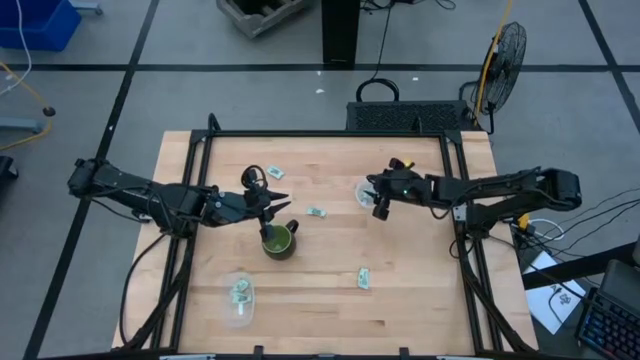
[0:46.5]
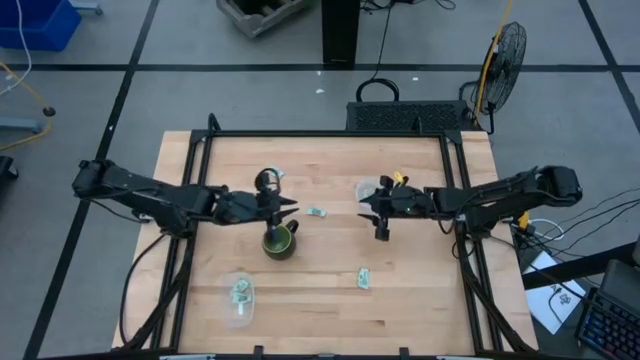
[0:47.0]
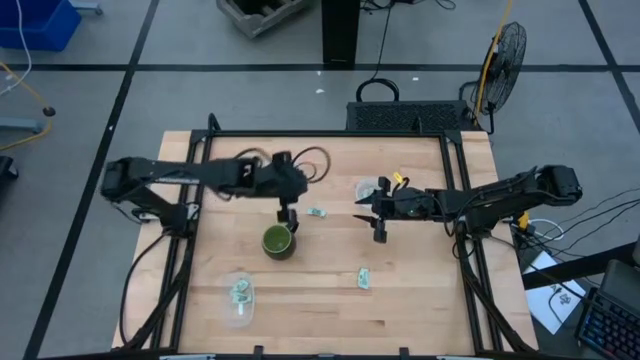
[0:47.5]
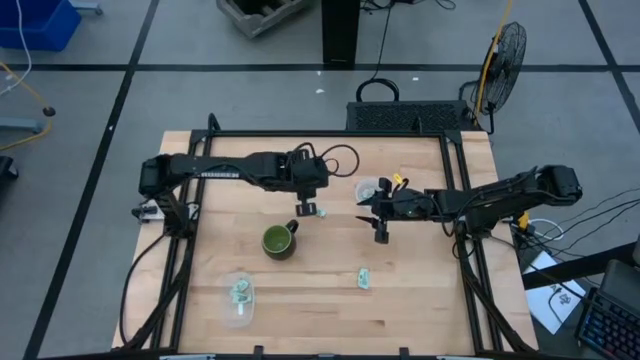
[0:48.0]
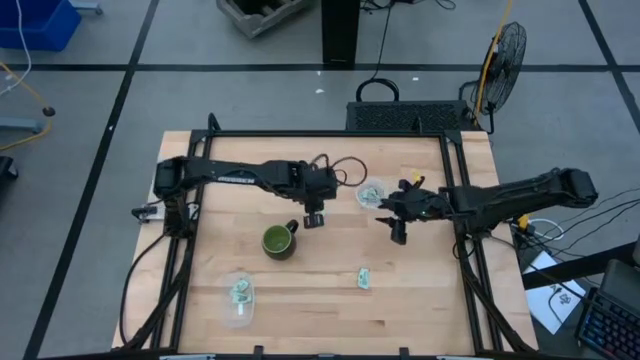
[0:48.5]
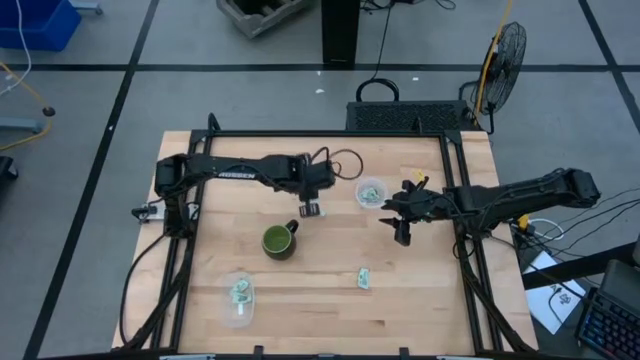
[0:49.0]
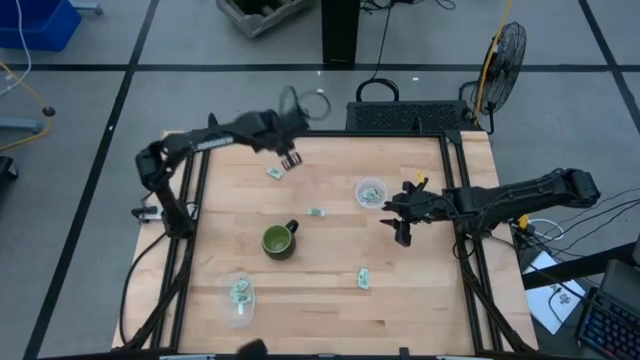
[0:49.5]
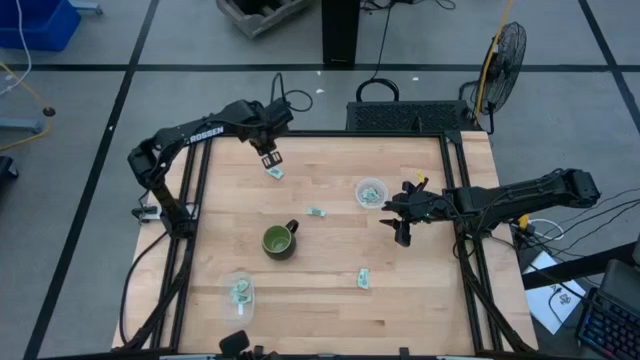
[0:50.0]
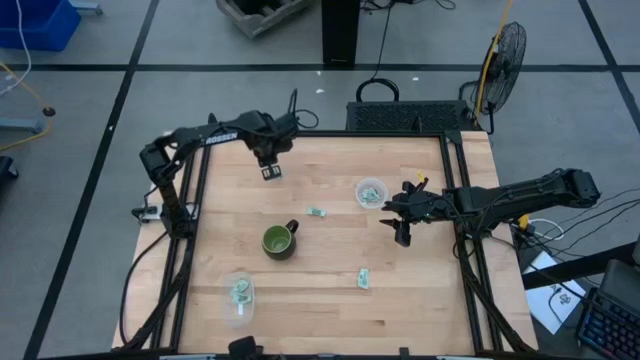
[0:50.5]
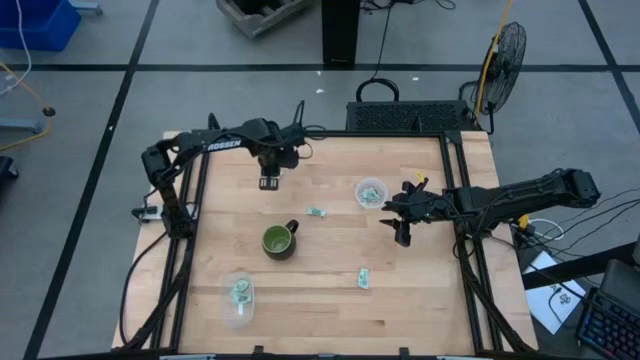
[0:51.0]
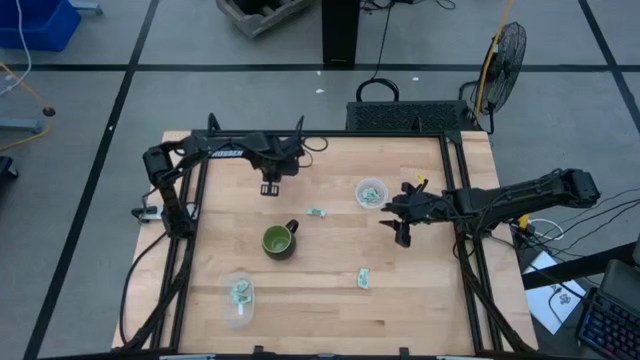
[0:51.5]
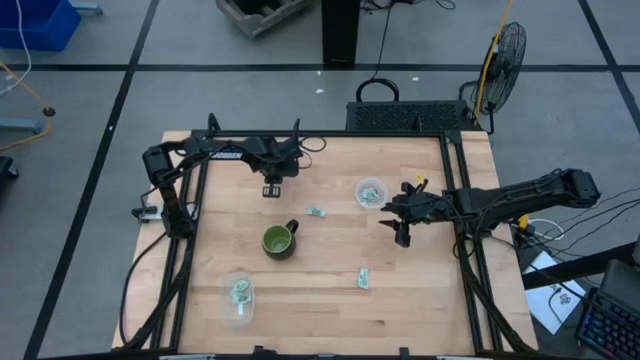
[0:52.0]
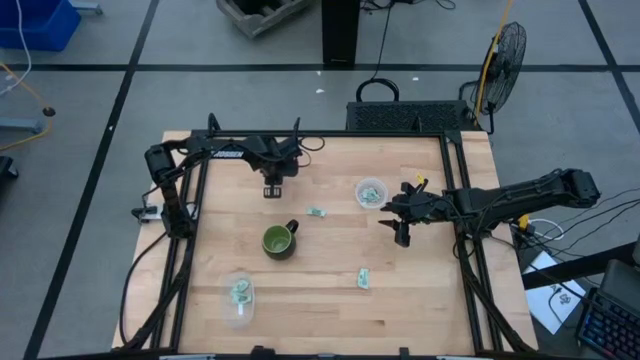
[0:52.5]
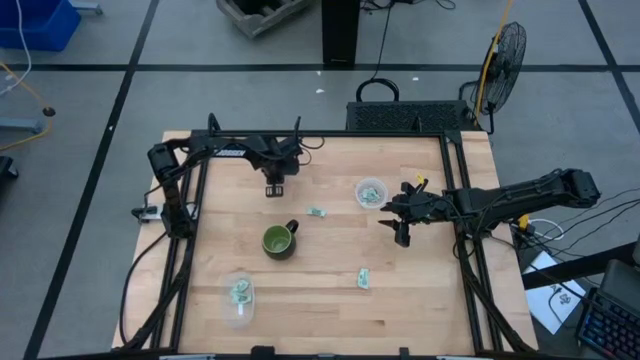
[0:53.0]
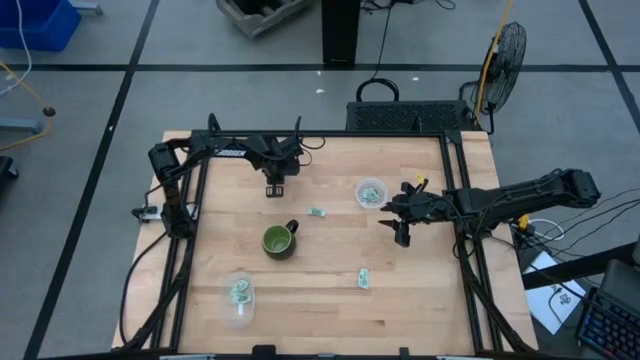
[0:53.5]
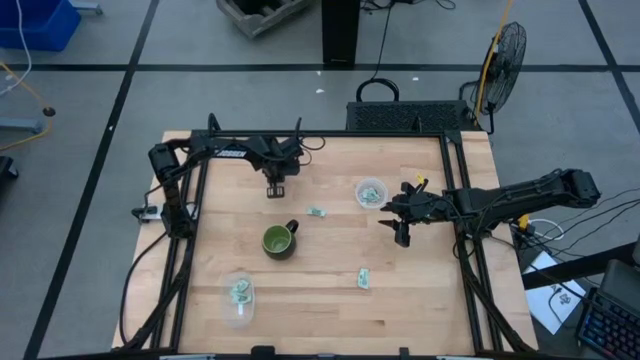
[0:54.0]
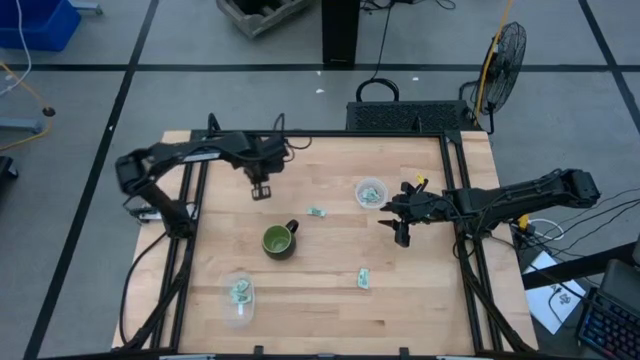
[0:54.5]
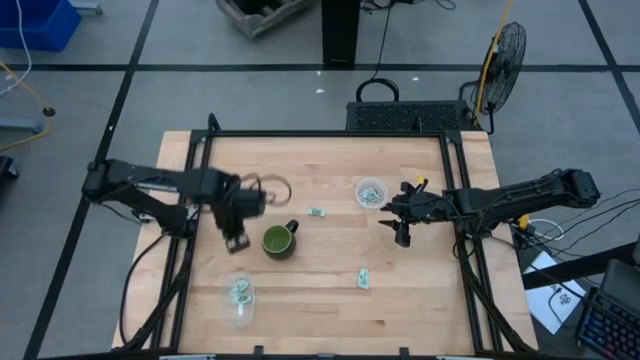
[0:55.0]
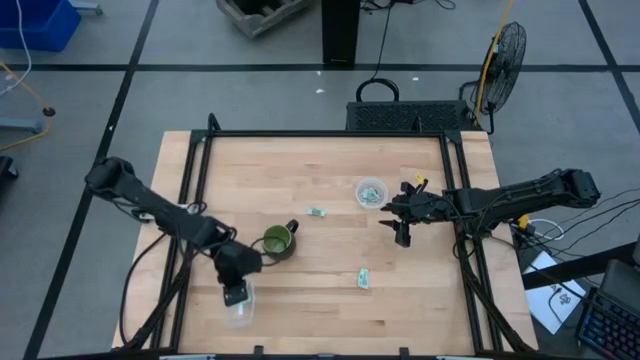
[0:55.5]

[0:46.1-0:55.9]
Task: Pick and place Stevia / Truvia into bins
Put the white stevia packet into the rectangle transparent container

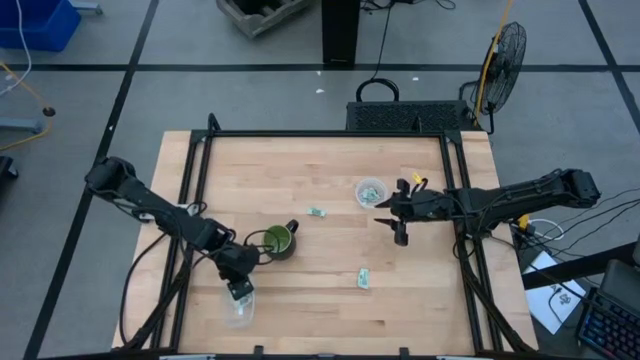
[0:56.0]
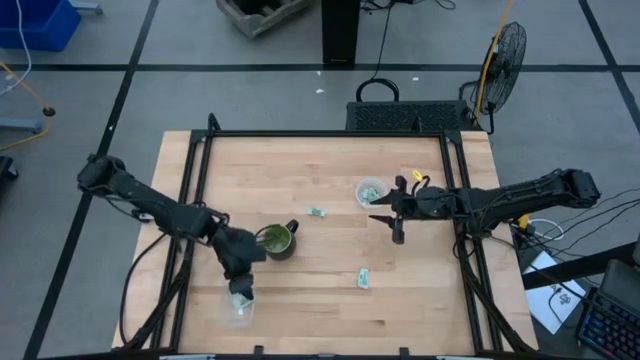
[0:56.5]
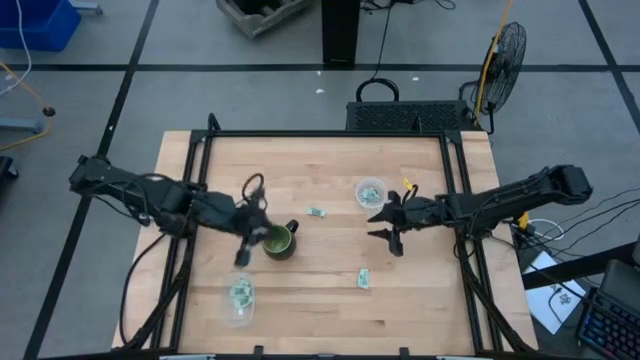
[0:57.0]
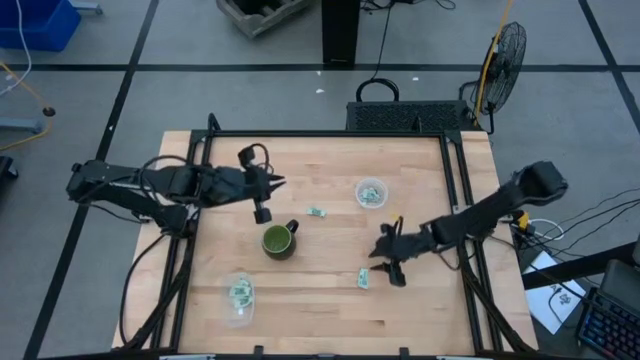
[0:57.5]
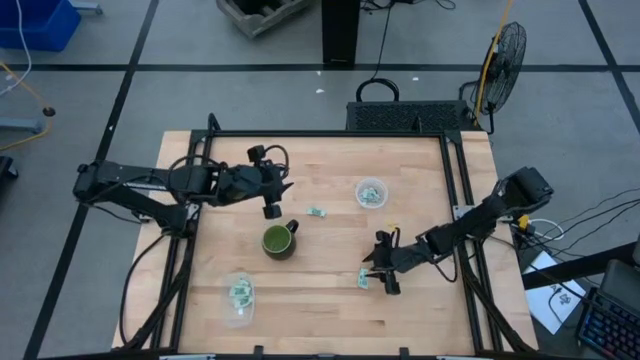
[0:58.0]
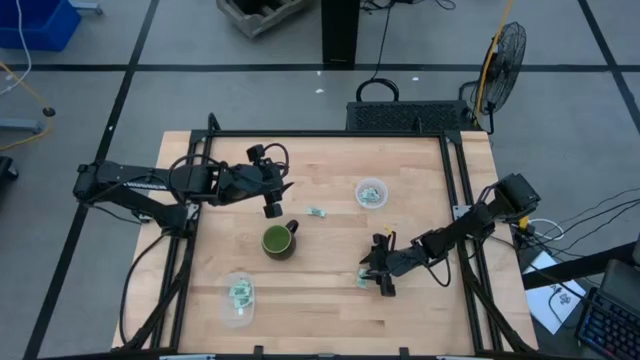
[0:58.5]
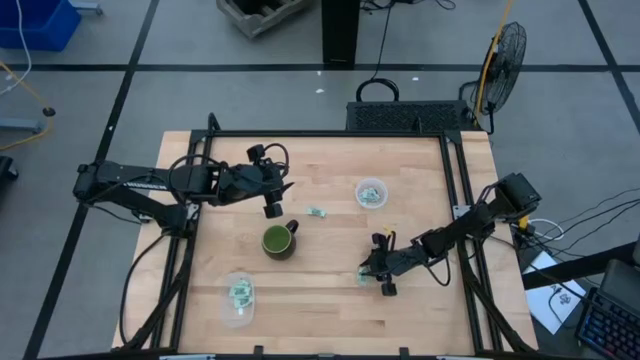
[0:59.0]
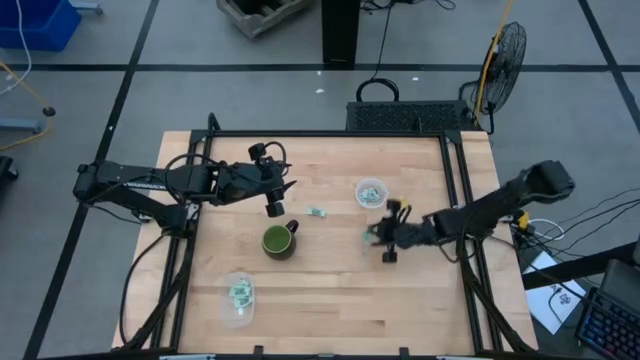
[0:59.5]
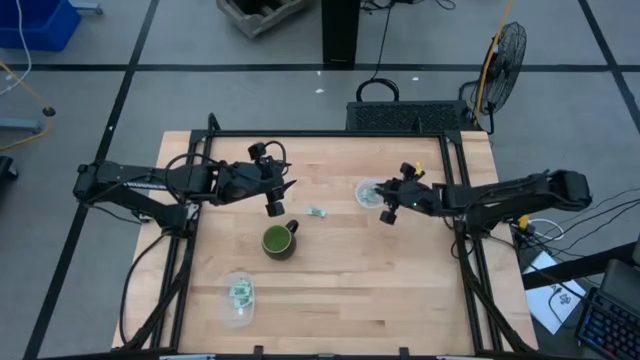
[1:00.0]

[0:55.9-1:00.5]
Put the white stevia packet into the circle transparent container

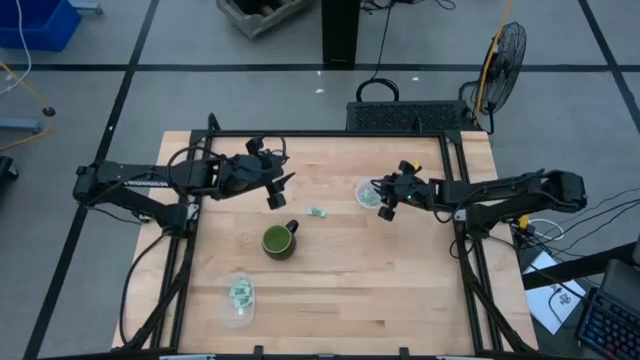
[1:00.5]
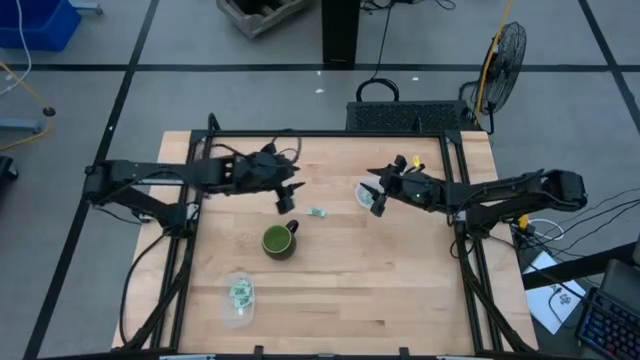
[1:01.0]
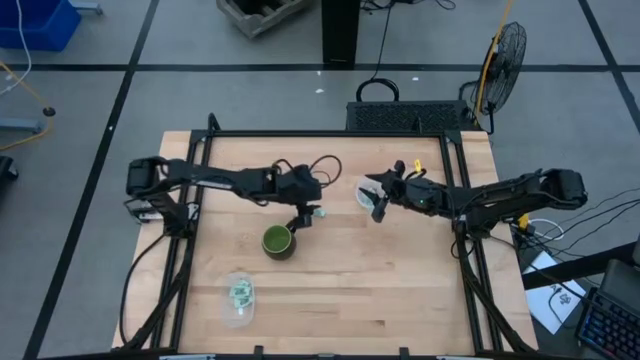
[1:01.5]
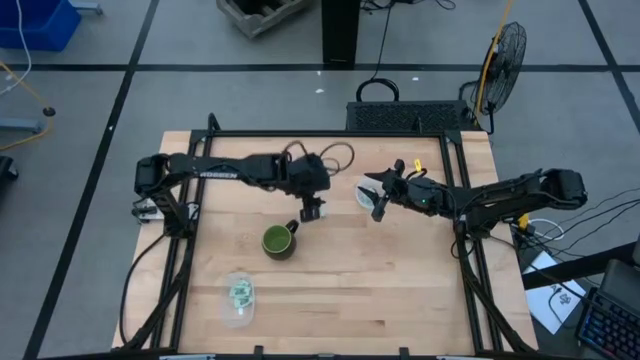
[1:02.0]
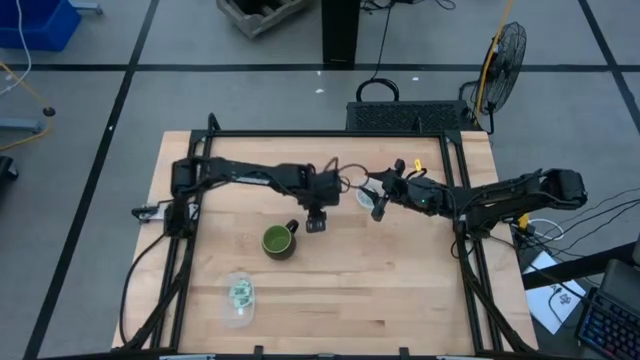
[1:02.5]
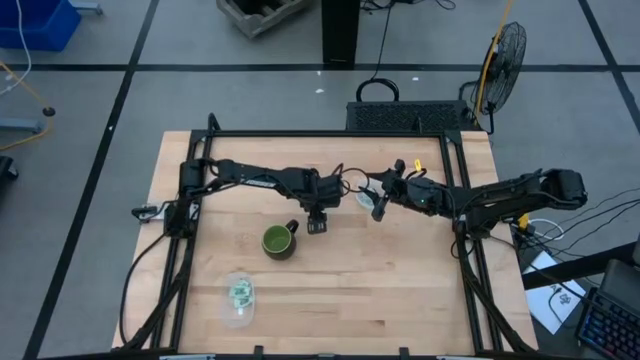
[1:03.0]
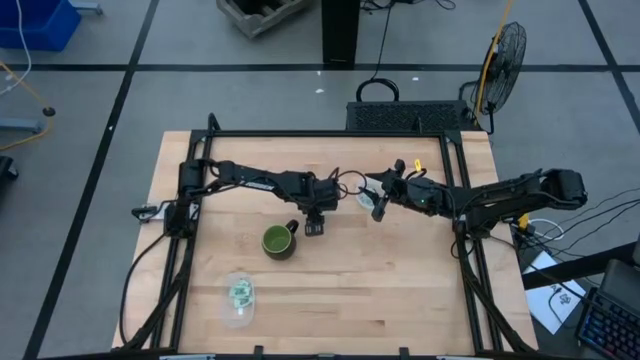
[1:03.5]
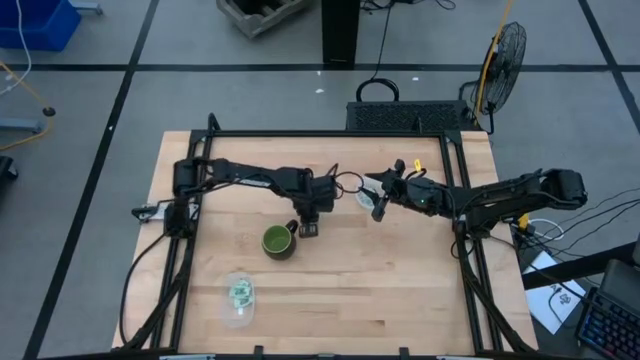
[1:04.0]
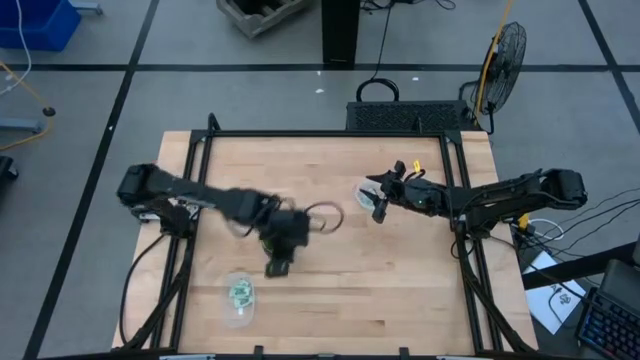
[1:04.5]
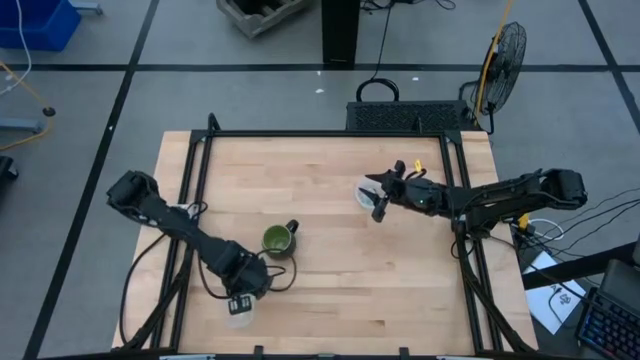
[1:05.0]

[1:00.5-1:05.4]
Put the white stevia packet into the rectangle transparent container
